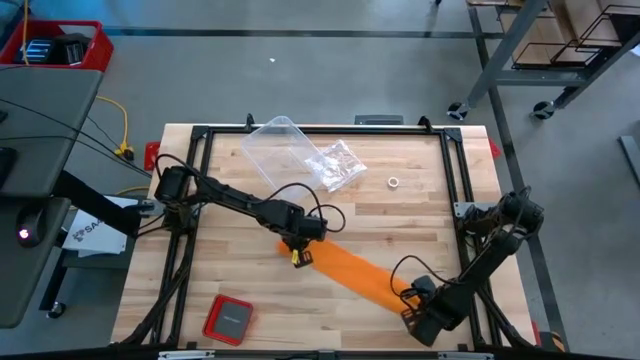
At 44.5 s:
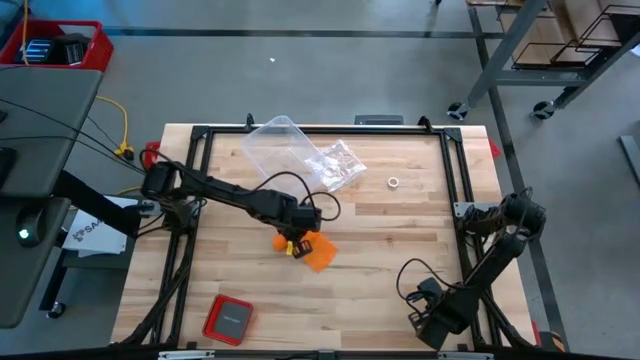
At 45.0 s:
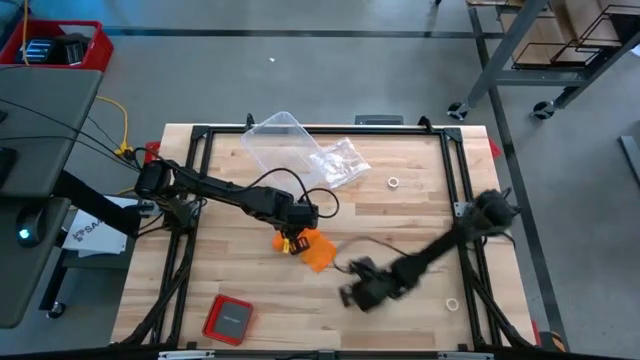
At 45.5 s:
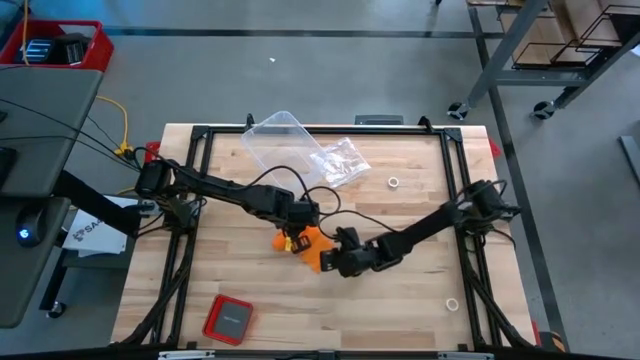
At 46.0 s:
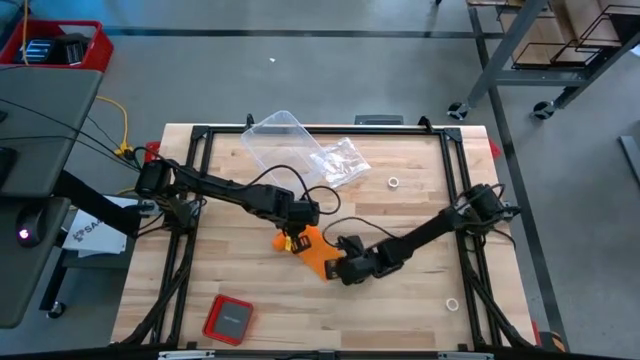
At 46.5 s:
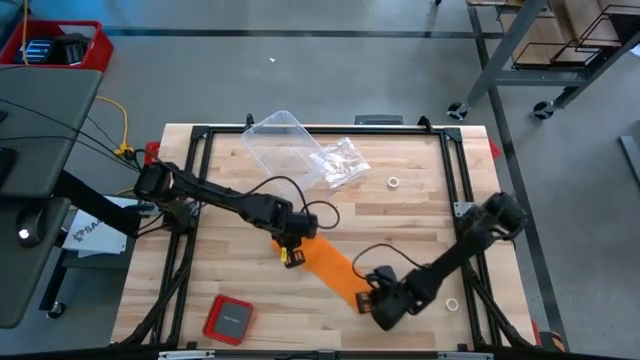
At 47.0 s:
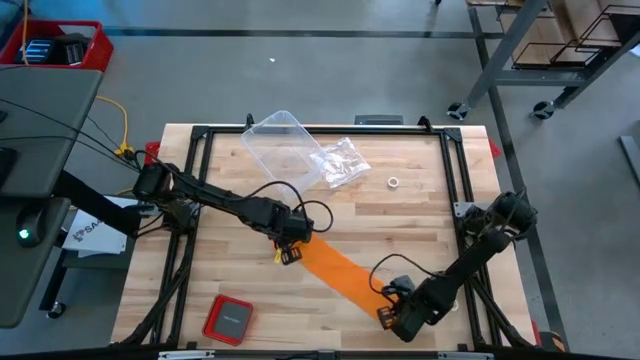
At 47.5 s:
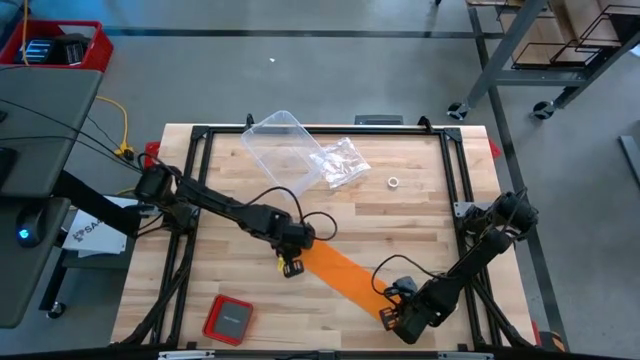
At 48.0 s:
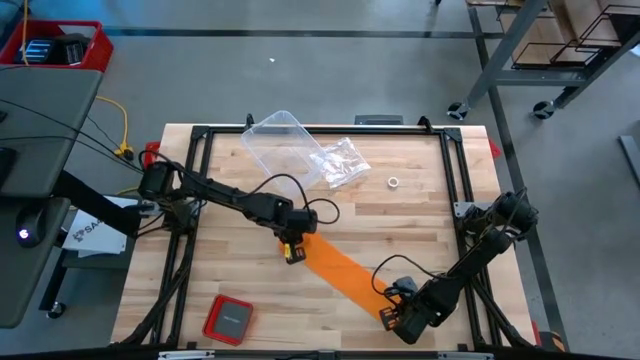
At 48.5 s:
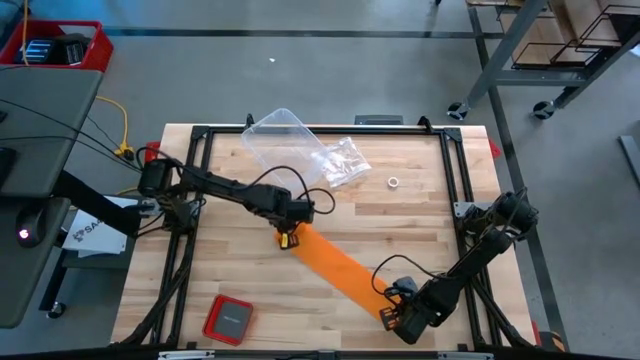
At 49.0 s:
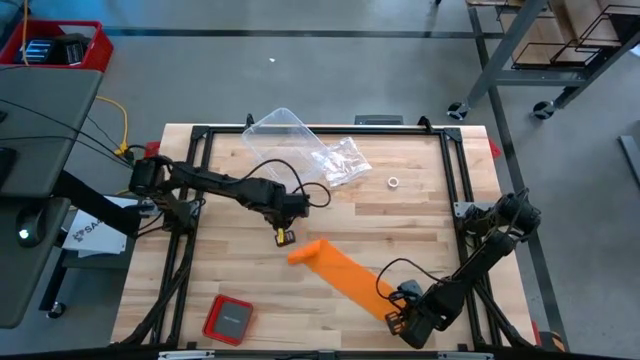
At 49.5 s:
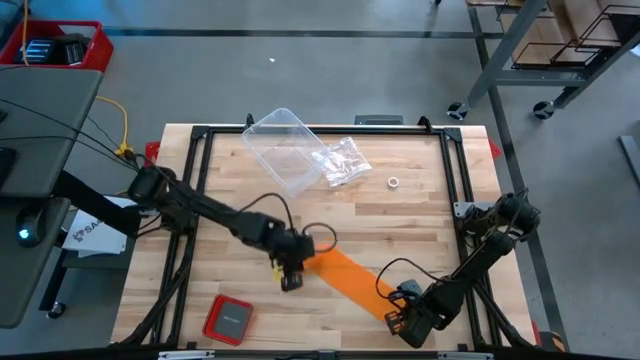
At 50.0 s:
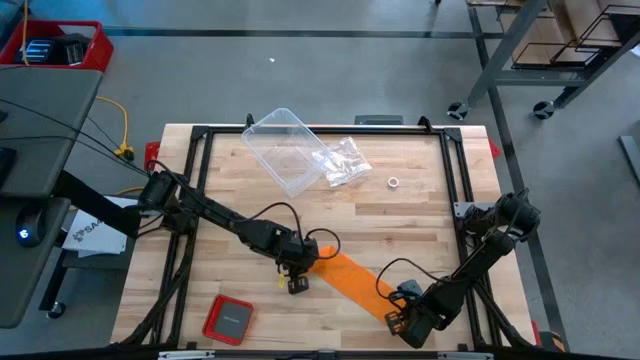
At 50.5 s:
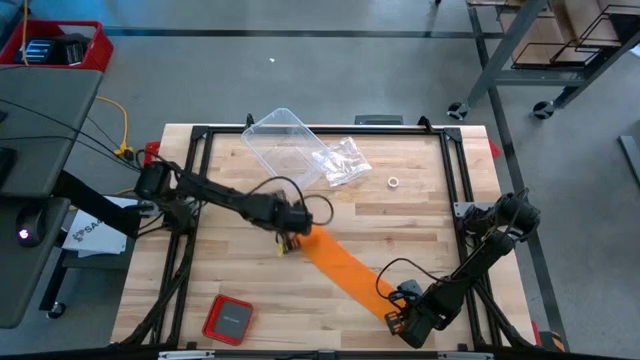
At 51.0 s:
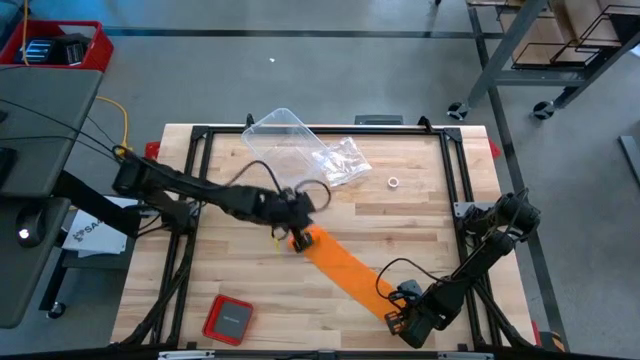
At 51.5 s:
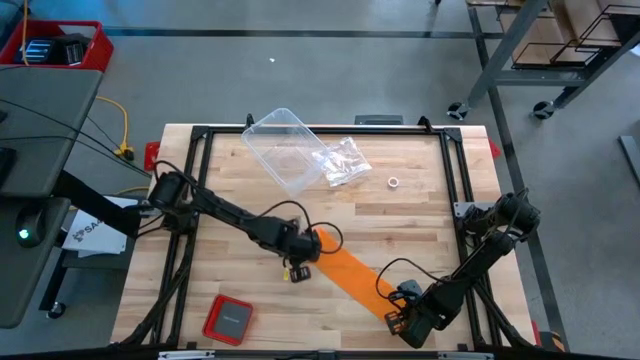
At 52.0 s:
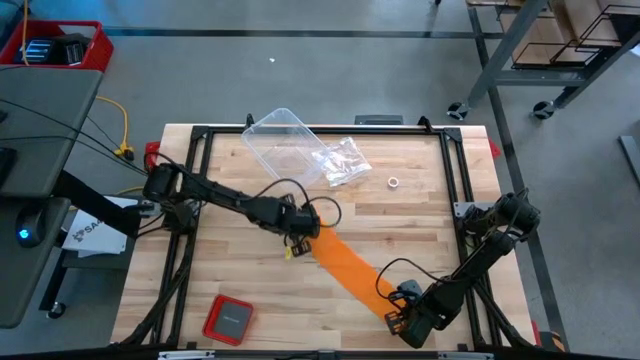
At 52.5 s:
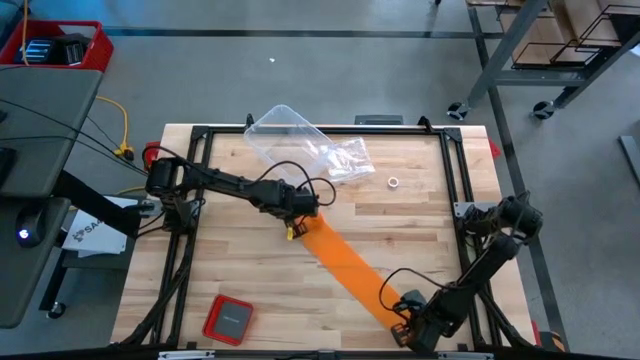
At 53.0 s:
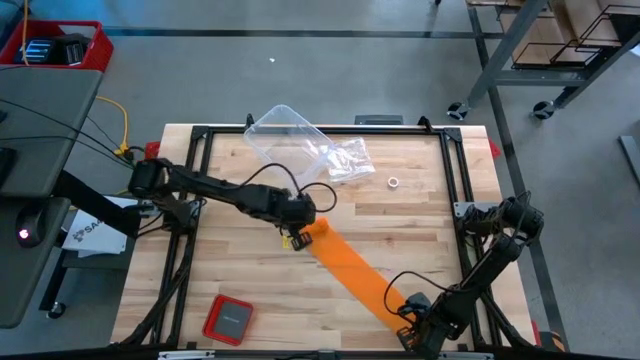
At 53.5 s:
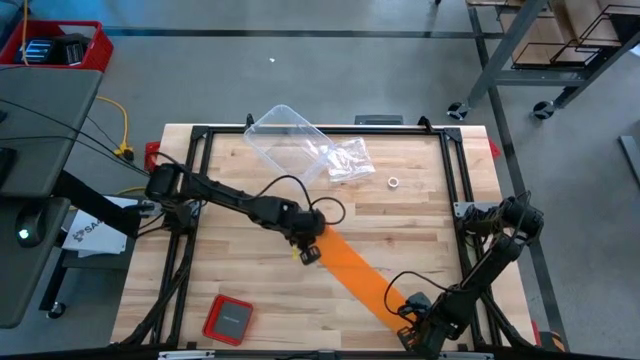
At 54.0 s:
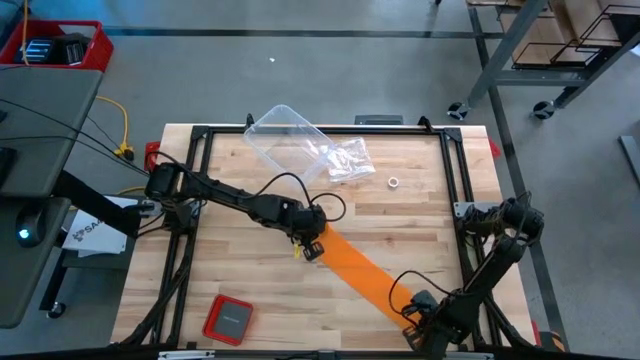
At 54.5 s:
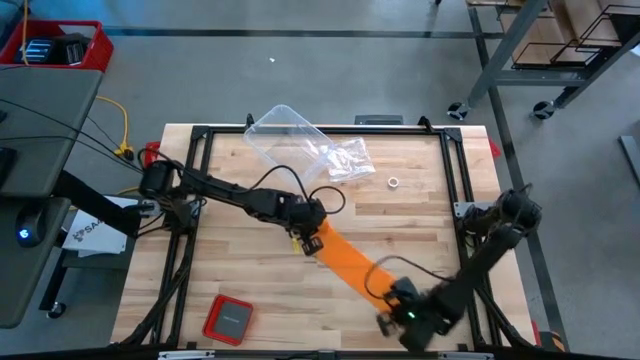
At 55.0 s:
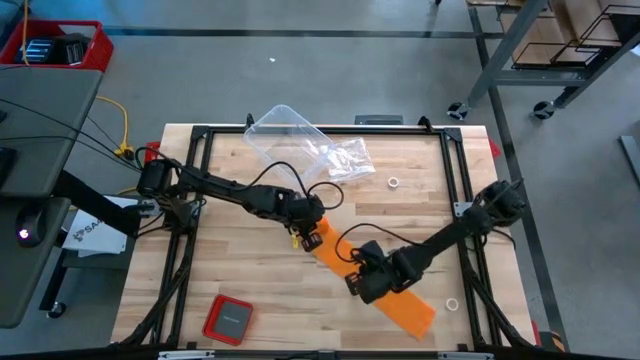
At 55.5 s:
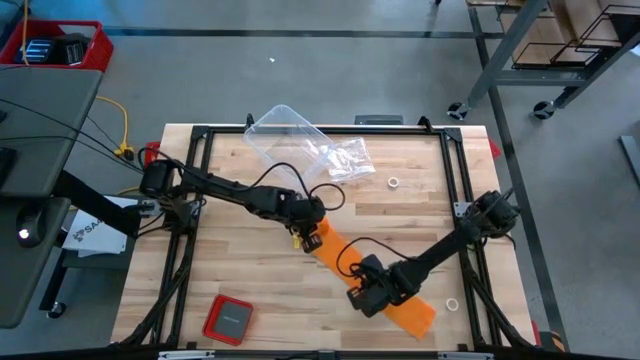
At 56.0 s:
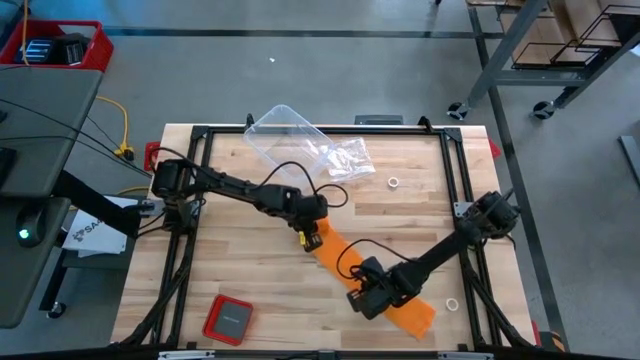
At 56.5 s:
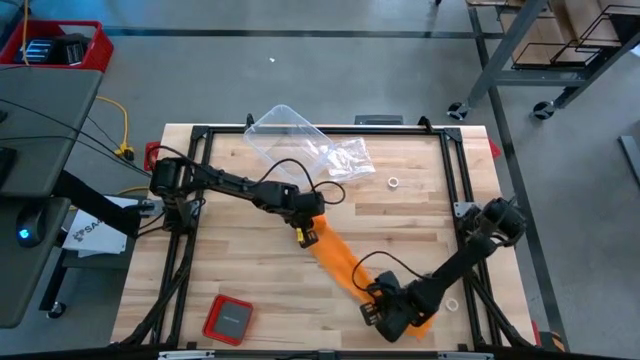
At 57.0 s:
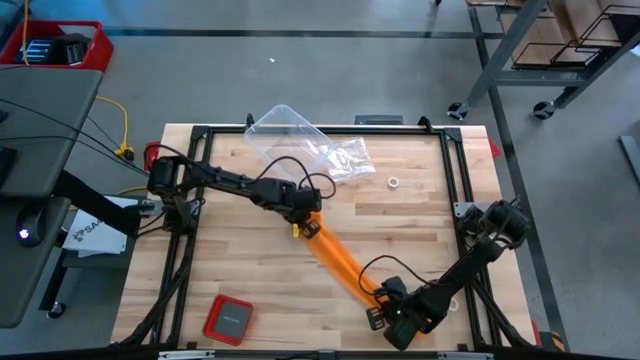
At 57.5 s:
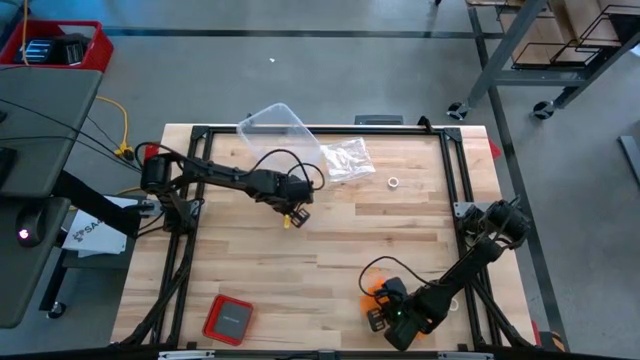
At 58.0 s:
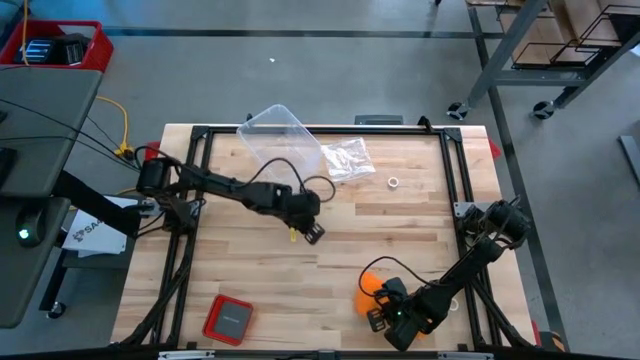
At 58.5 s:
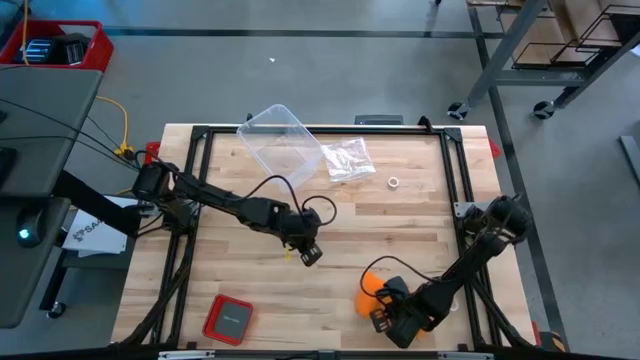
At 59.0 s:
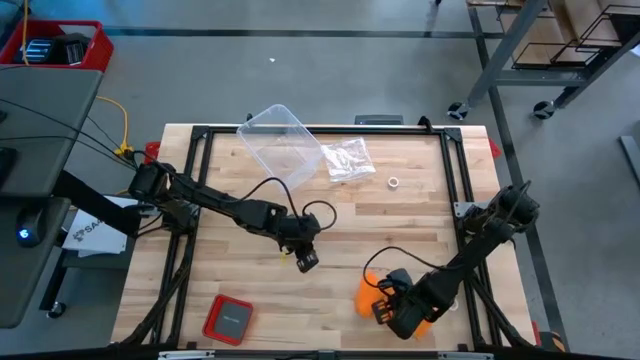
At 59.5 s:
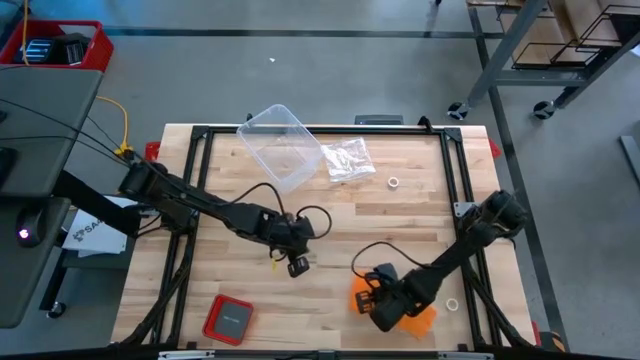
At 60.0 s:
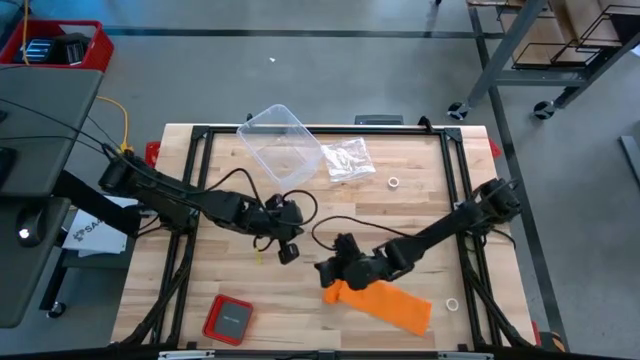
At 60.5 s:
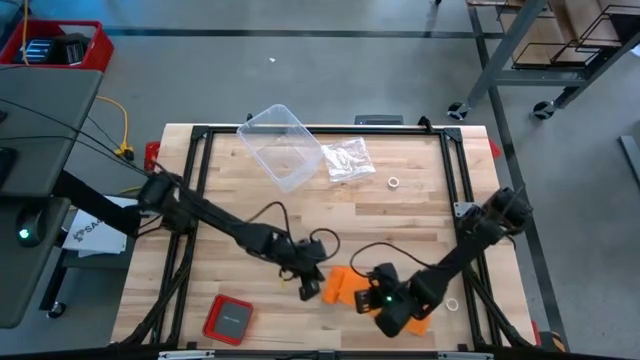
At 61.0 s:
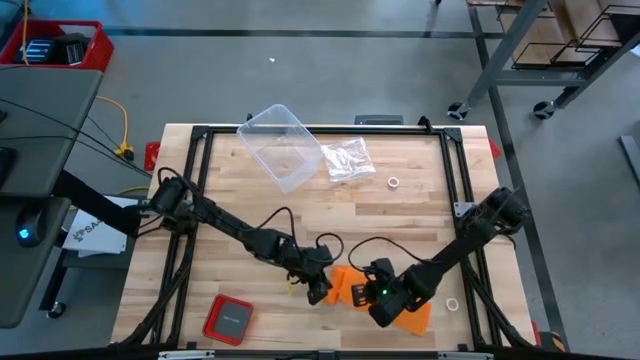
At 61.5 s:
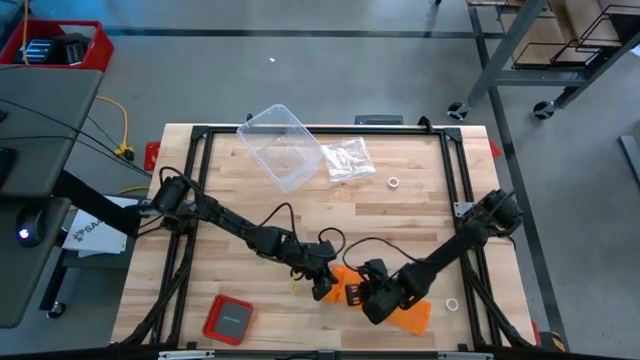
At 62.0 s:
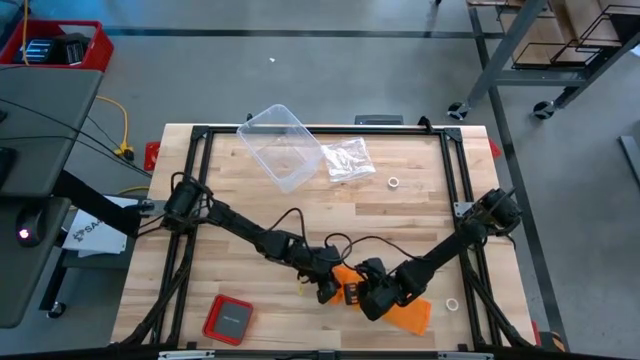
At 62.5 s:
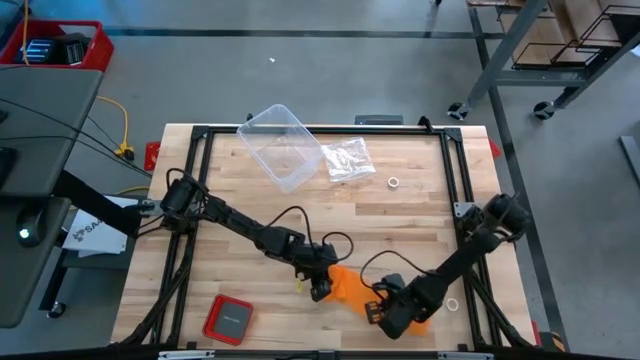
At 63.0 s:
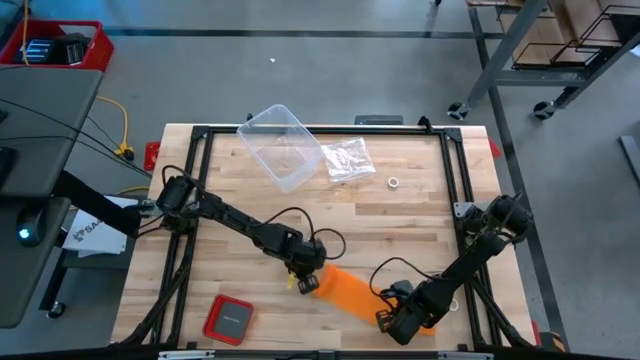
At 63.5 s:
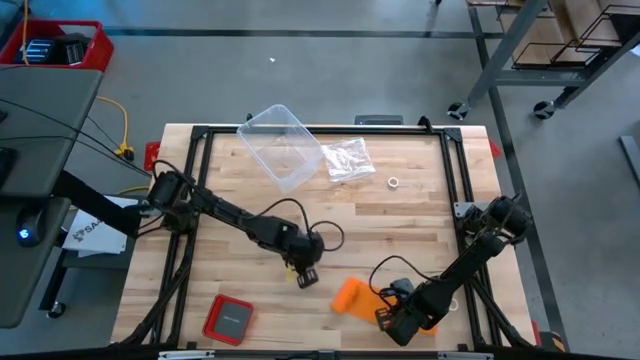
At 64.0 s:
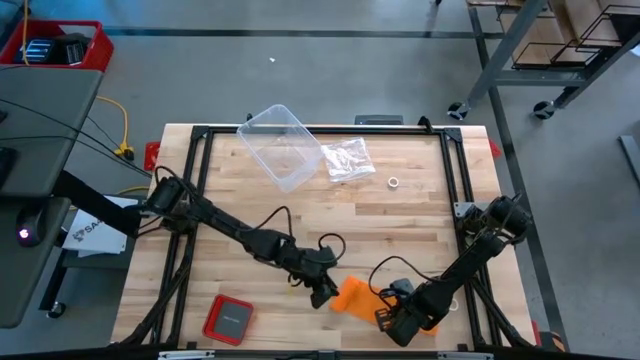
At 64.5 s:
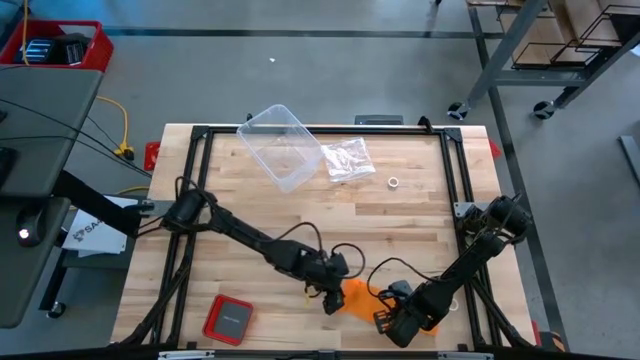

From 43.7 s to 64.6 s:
Task: Roll bandage
Roll the orange bandage

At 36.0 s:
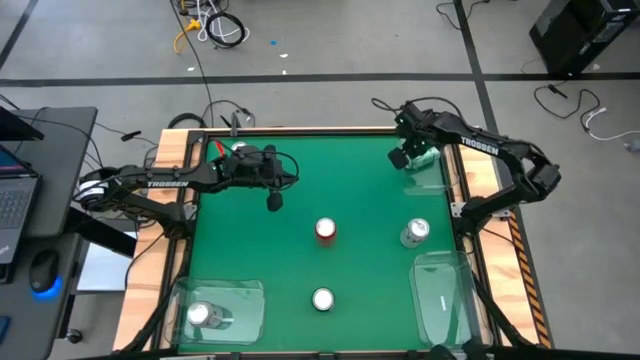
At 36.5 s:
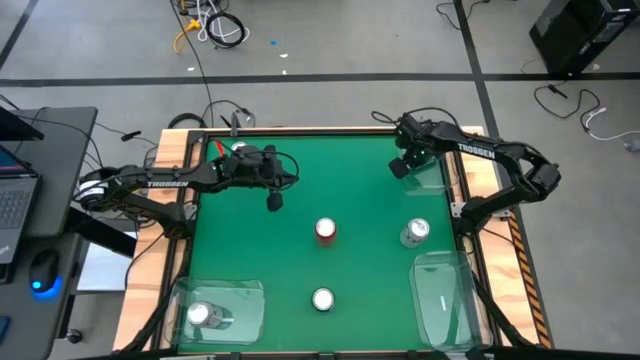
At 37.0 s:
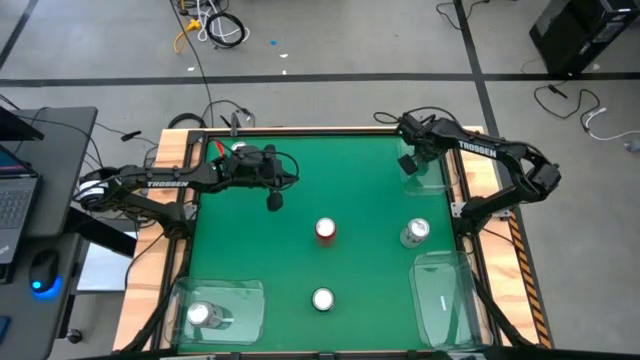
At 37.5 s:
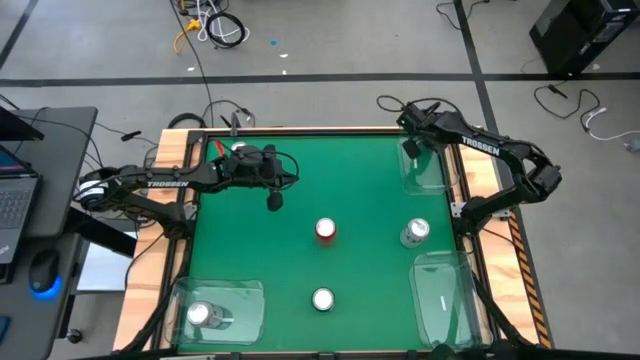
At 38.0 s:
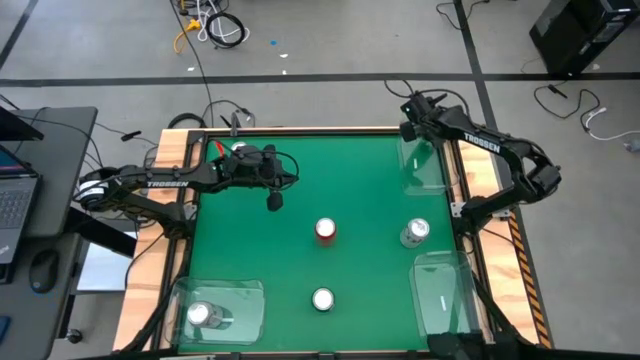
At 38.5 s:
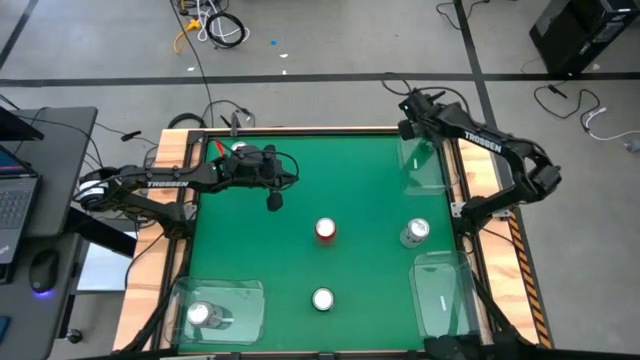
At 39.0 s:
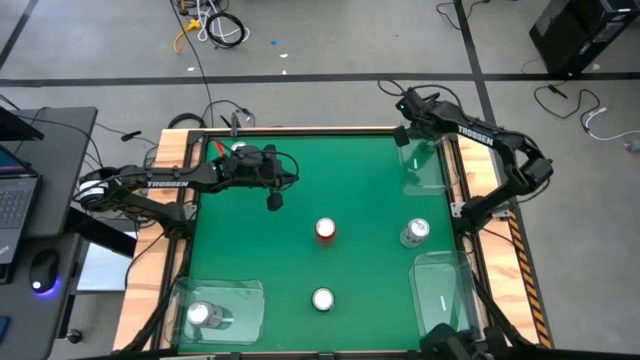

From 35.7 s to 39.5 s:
Task: Sort soda cans
Put the top green soda can into the top right transparent bin
